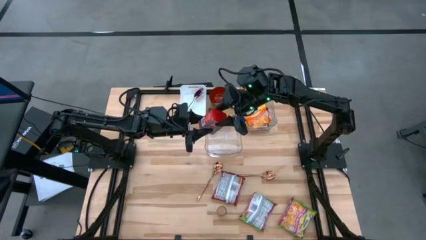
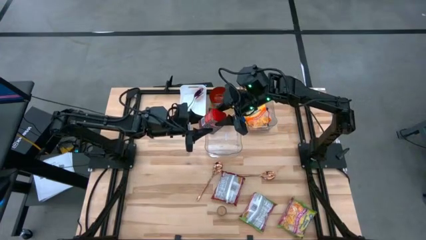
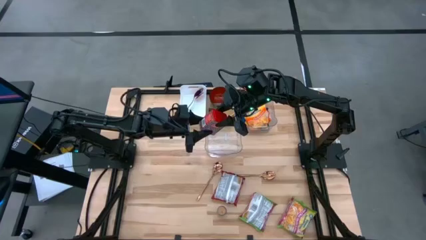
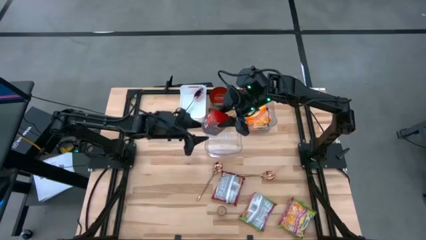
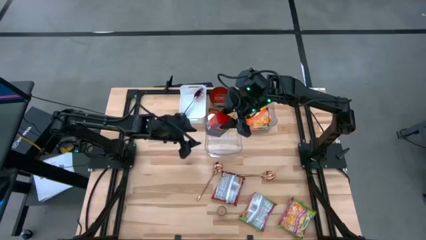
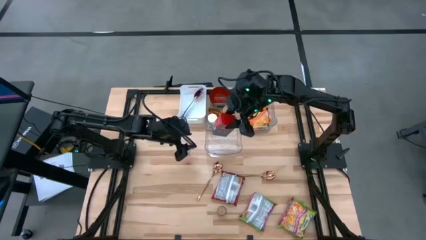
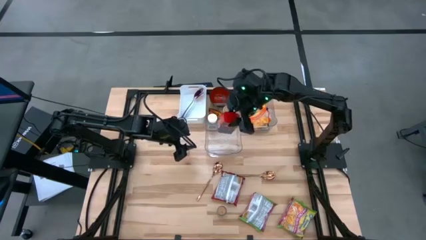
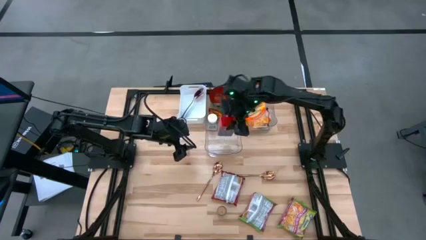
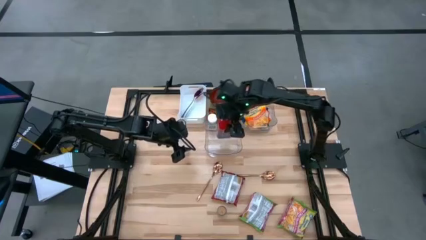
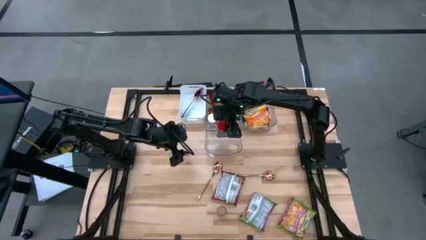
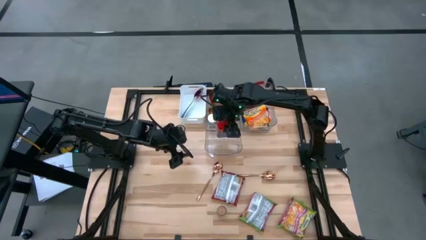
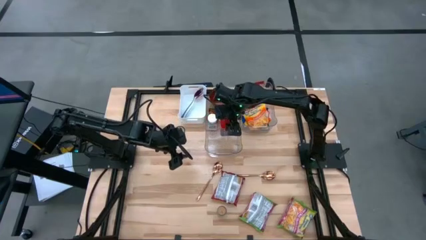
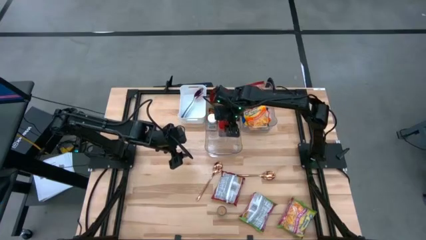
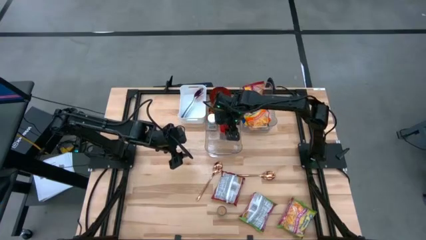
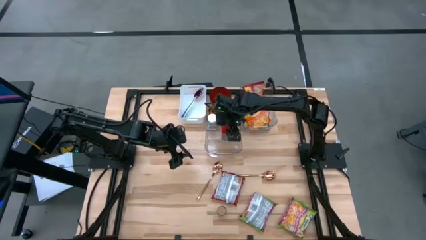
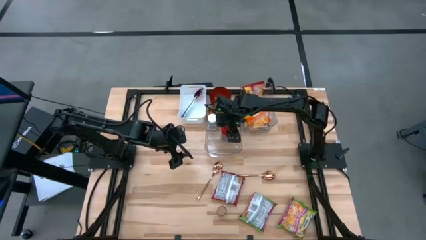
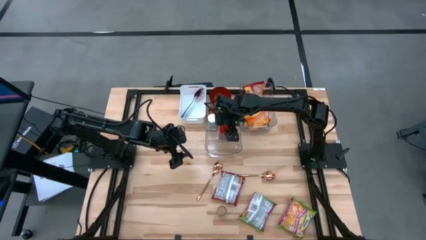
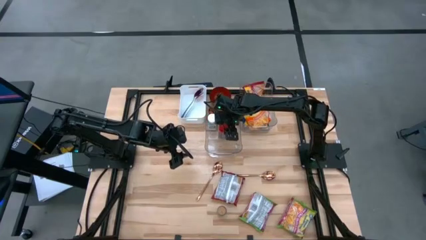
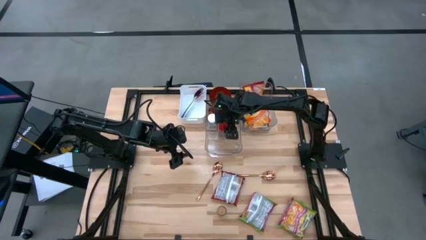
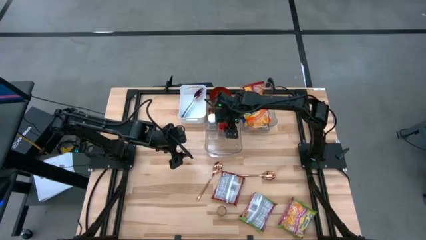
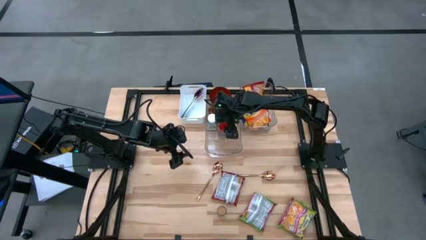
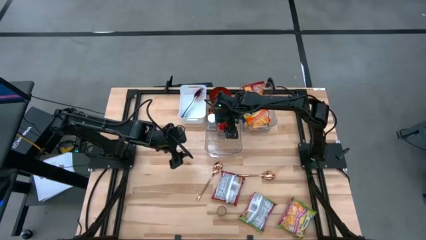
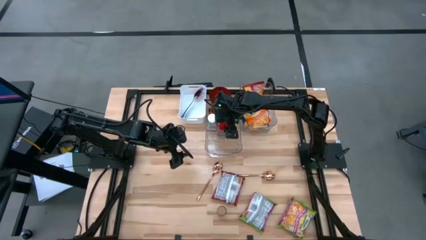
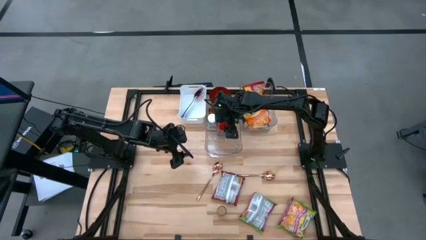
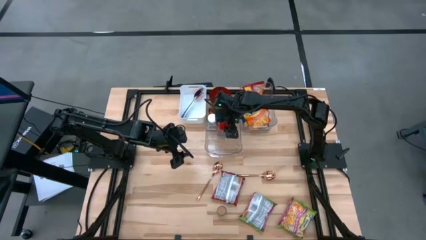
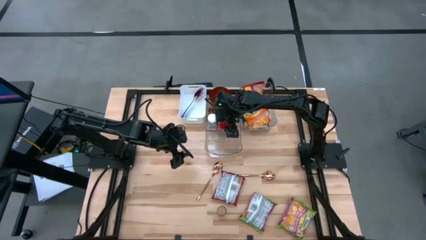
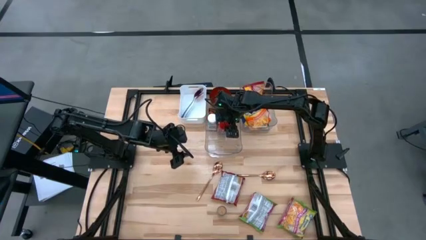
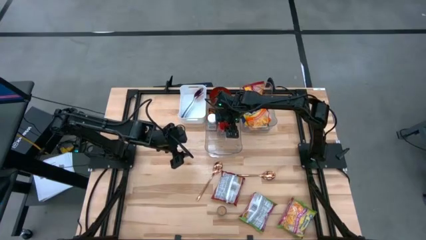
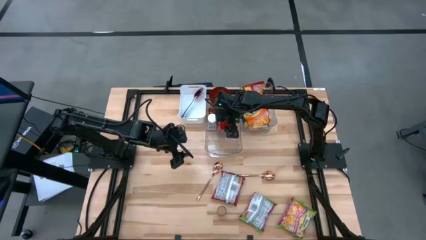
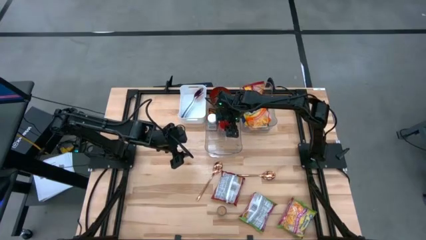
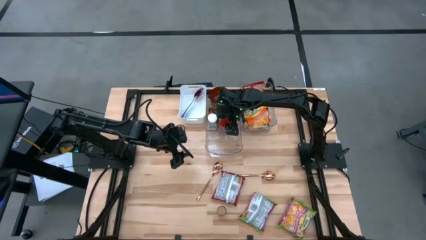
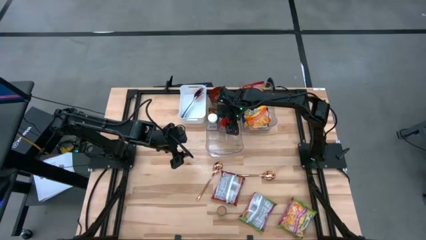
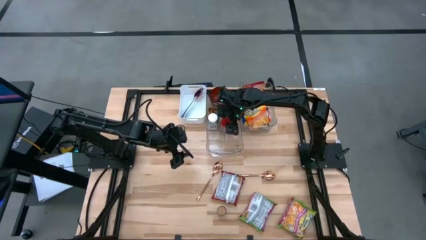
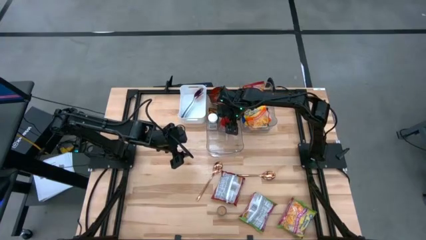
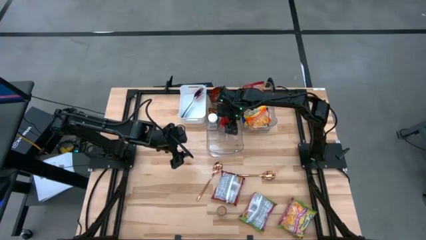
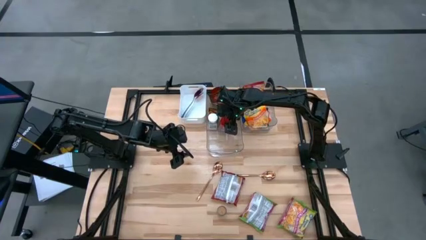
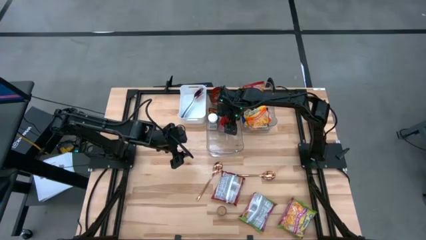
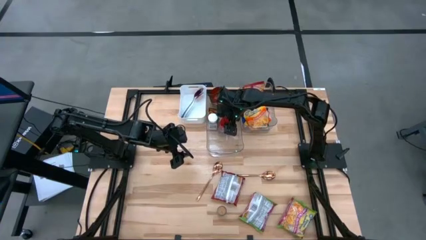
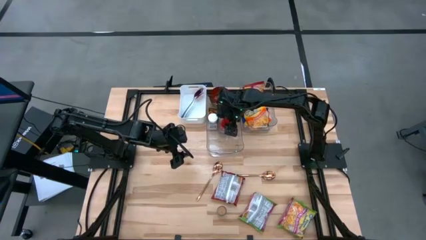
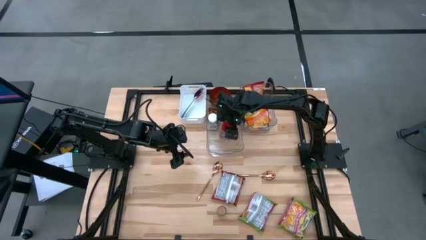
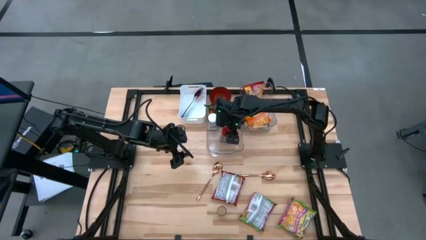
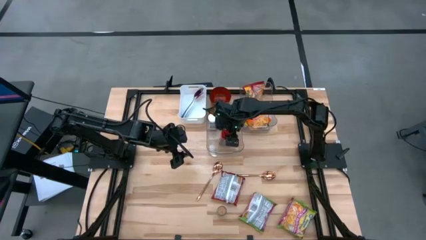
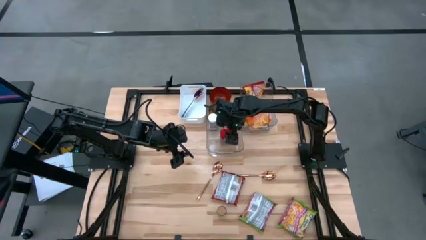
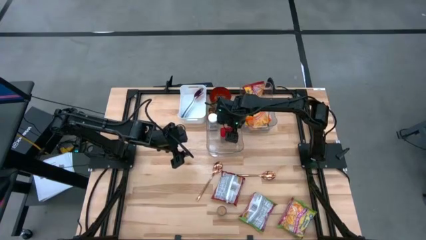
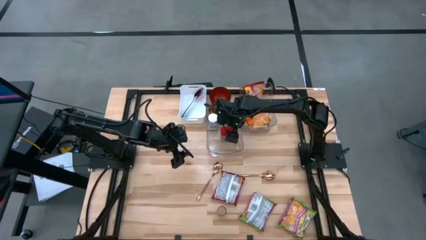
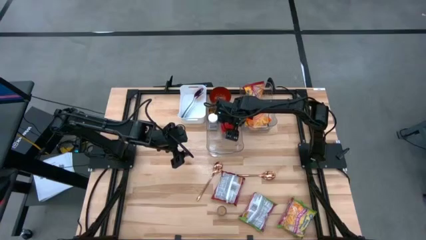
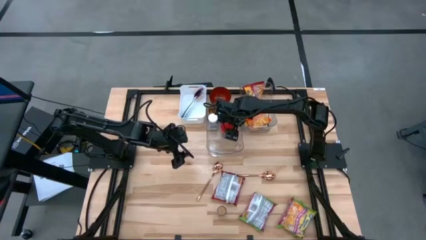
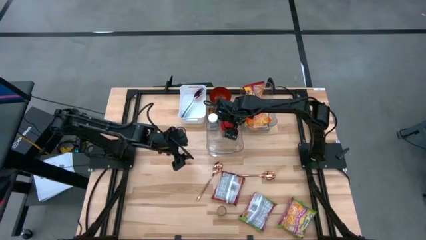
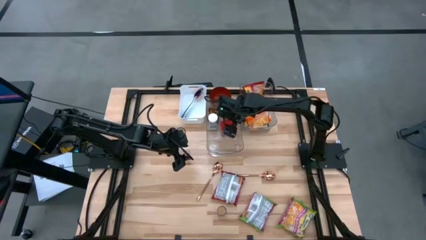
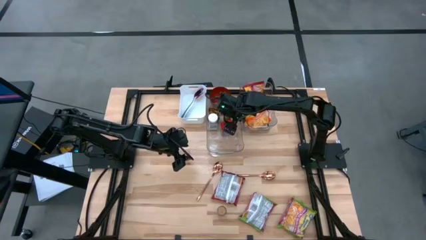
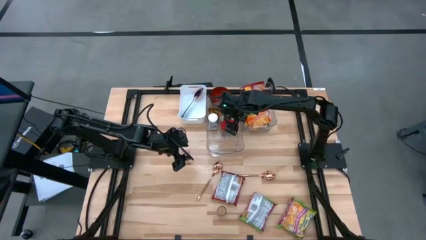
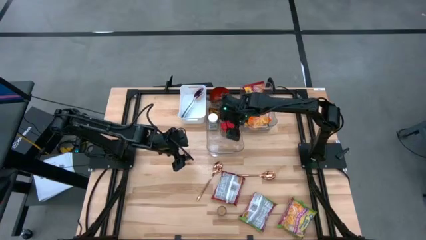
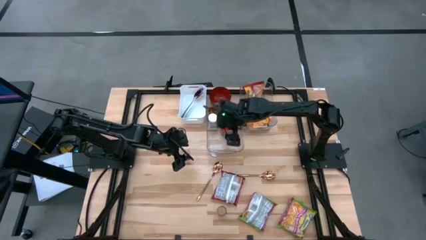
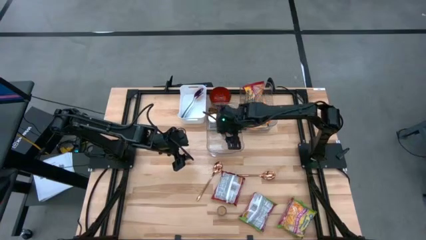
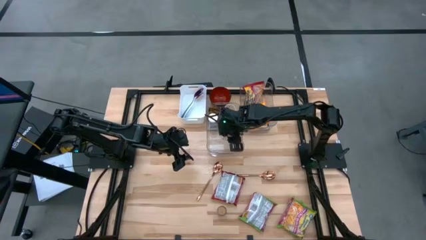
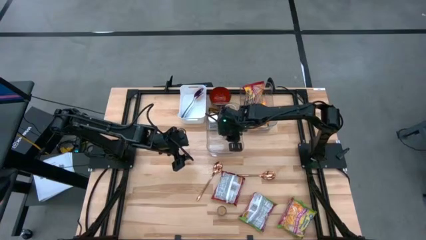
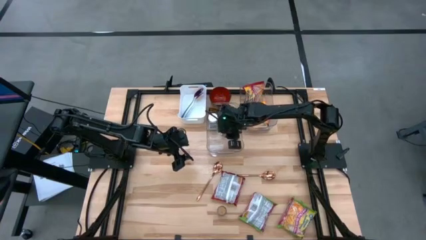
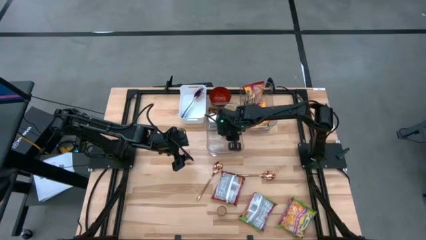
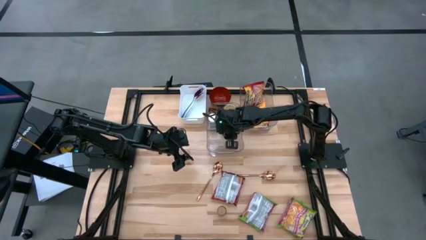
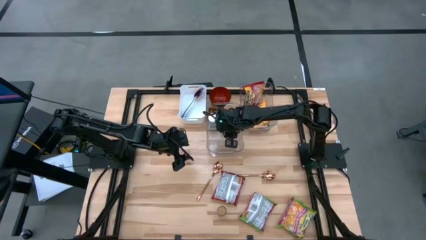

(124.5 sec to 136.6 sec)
Task: Pick & Place Food Item
Put the red spice can into the left transparent bin
